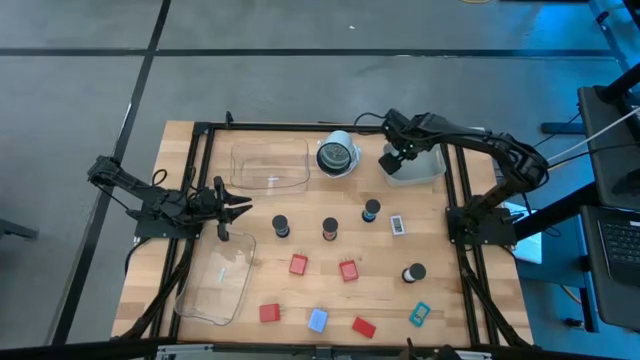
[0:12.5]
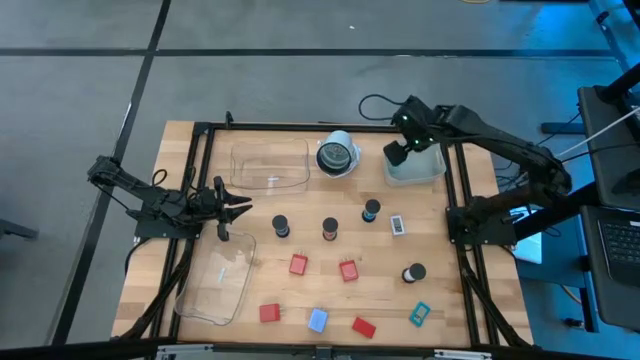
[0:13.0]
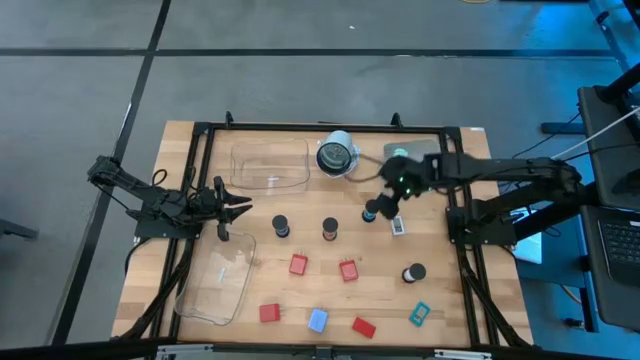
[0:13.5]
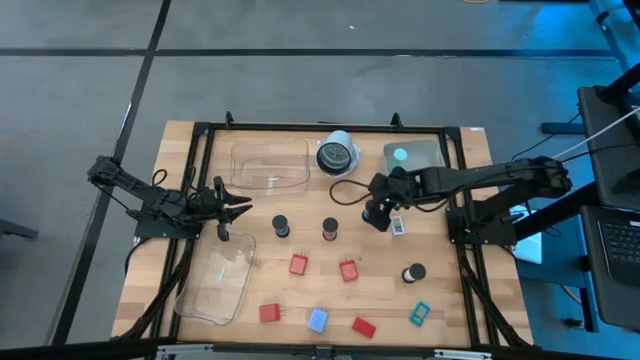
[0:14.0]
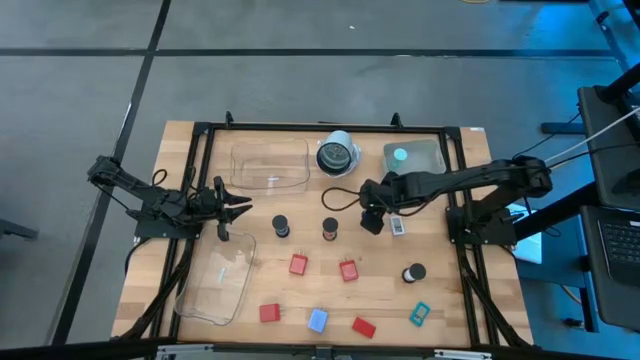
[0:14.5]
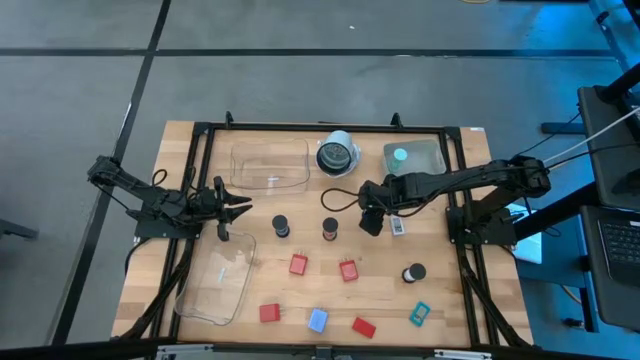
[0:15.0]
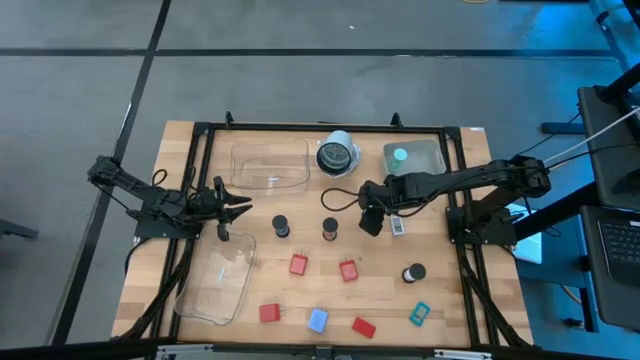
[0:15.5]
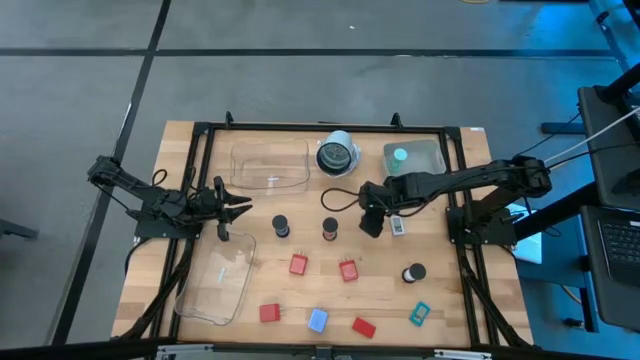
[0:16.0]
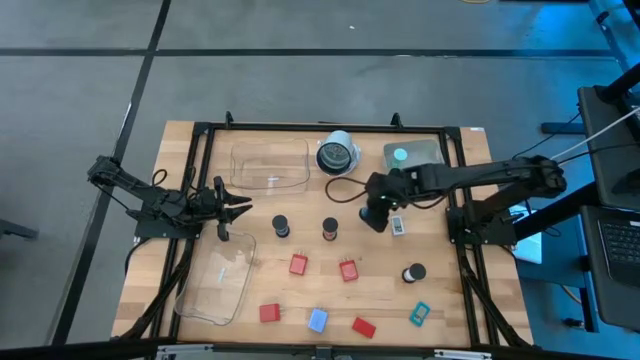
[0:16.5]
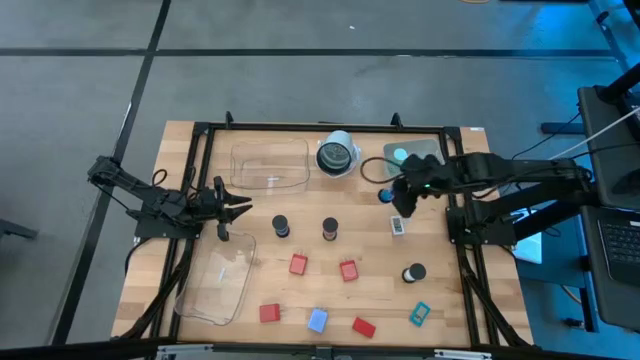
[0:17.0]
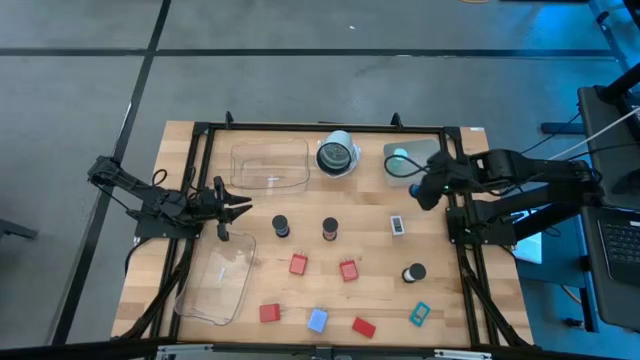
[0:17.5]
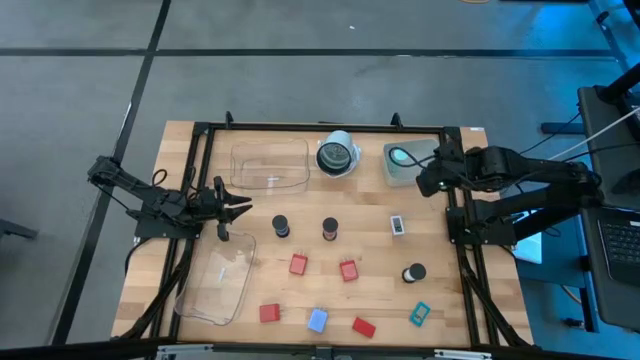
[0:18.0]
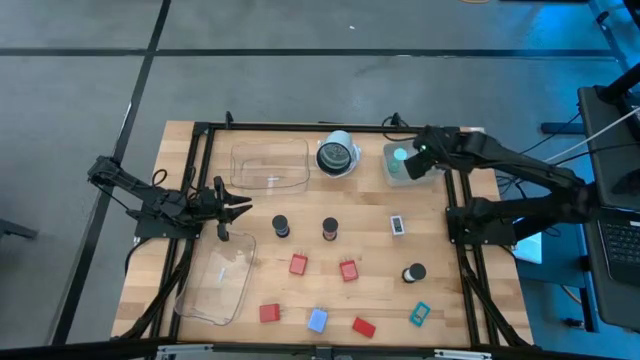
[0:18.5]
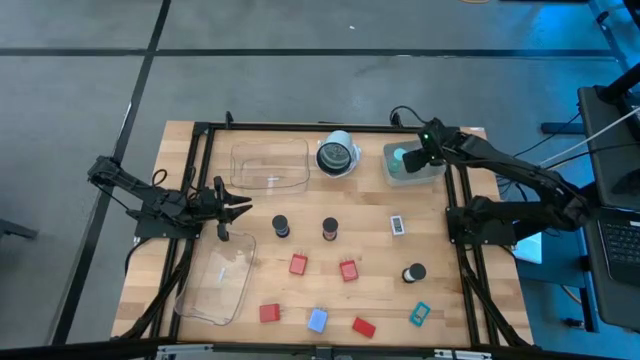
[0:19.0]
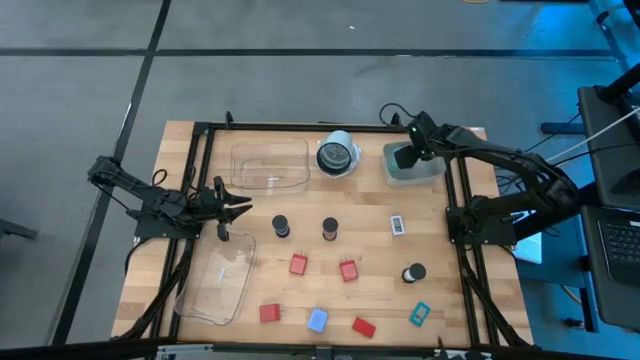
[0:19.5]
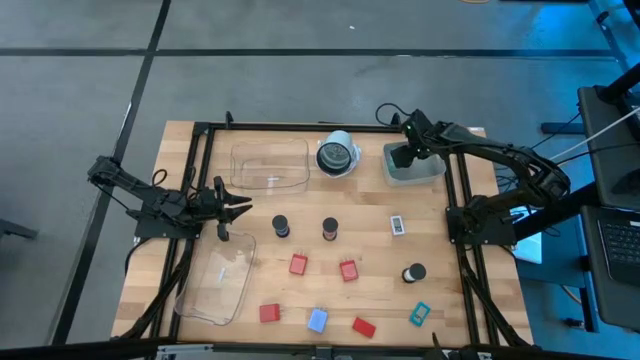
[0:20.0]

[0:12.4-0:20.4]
Task: Pick & Place Office items
Put the blue hourglass into the gray bin

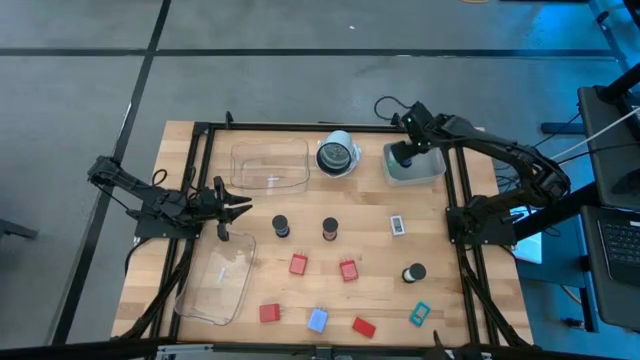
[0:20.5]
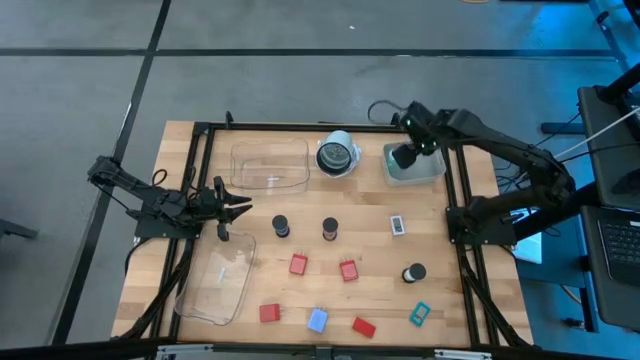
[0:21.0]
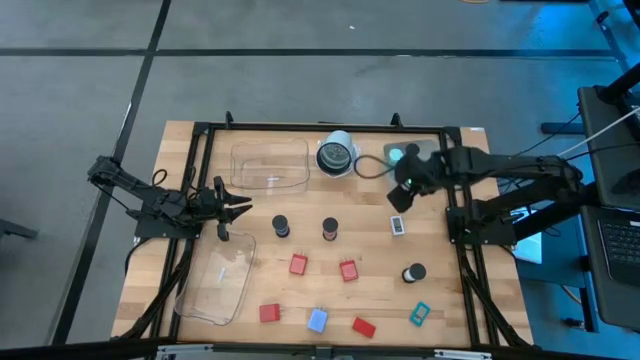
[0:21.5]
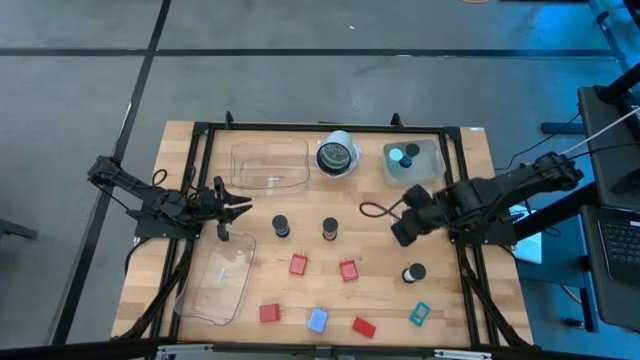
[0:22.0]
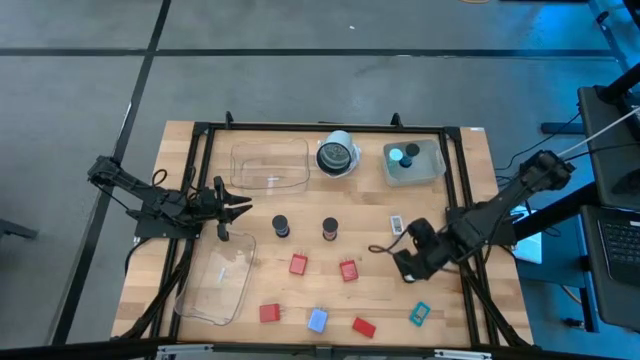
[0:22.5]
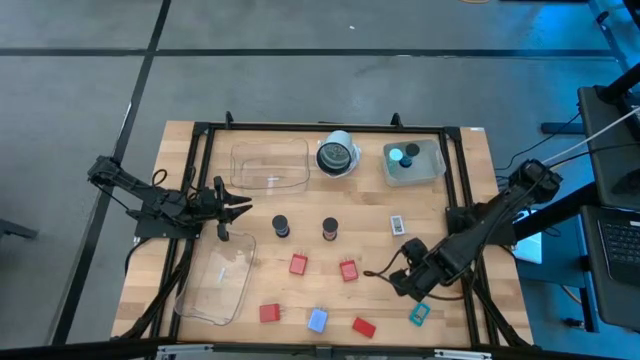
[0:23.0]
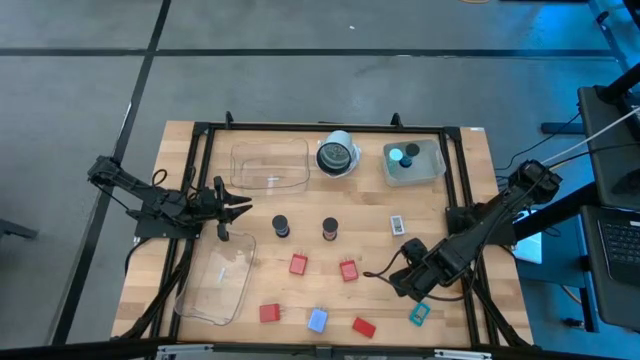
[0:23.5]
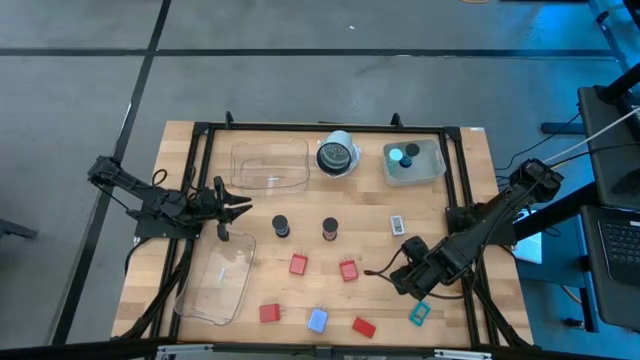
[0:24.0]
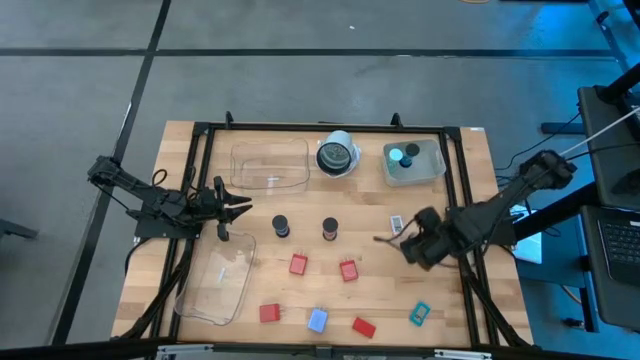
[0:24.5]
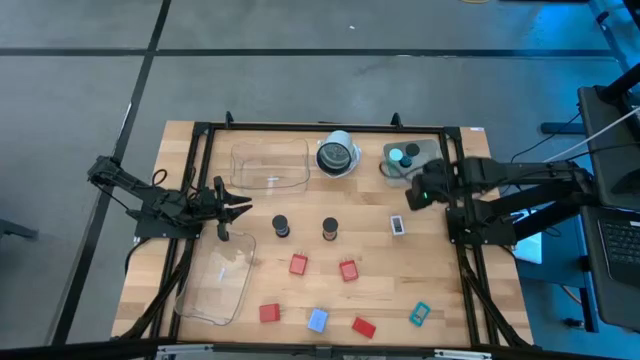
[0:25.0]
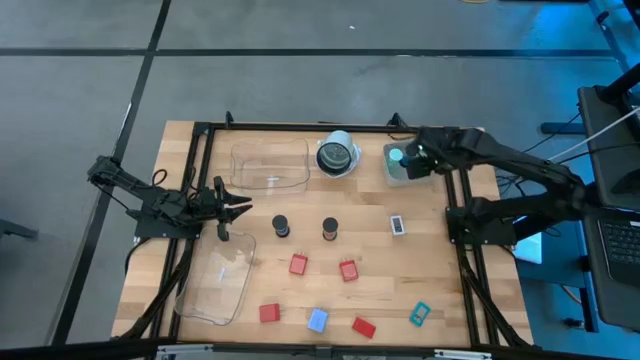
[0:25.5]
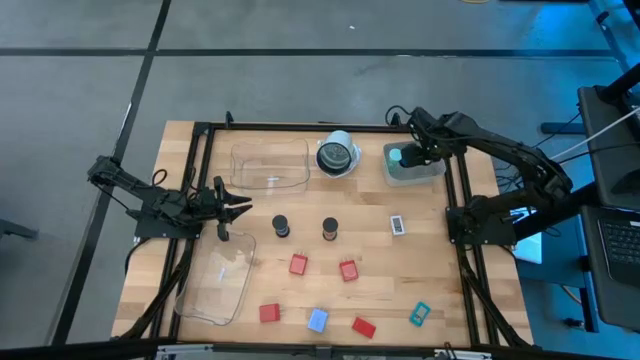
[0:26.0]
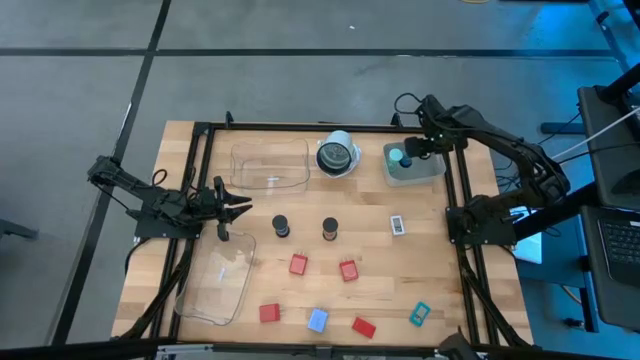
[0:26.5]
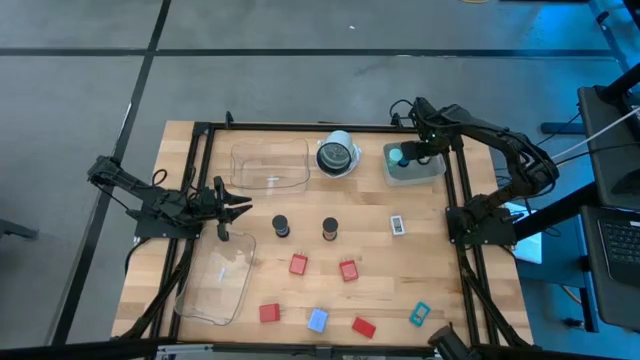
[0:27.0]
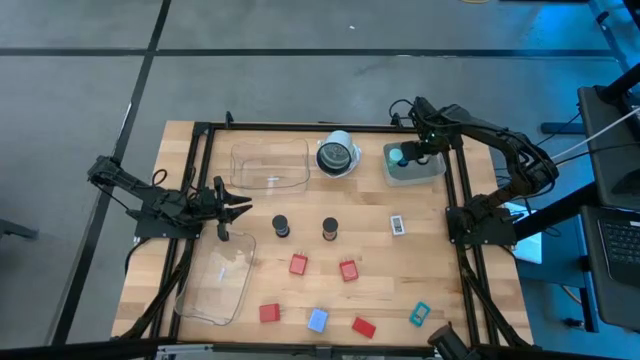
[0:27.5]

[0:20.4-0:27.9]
Put the white hourglass into the gray bin

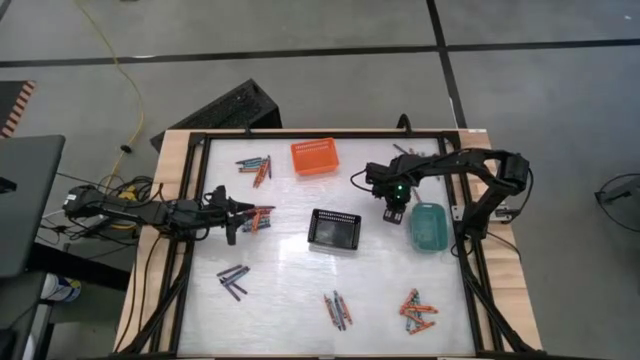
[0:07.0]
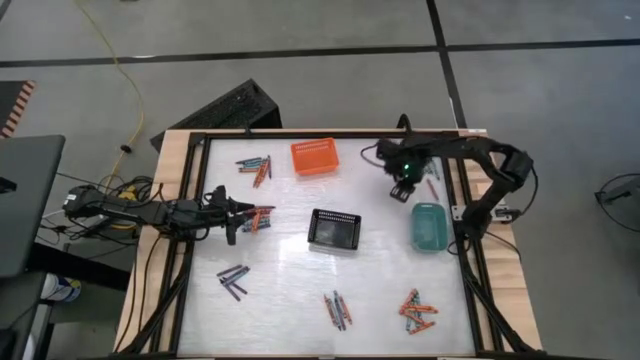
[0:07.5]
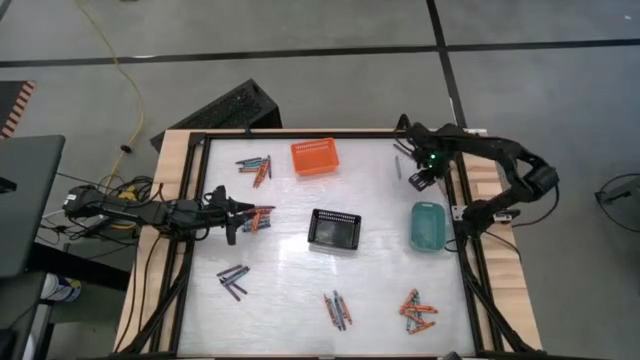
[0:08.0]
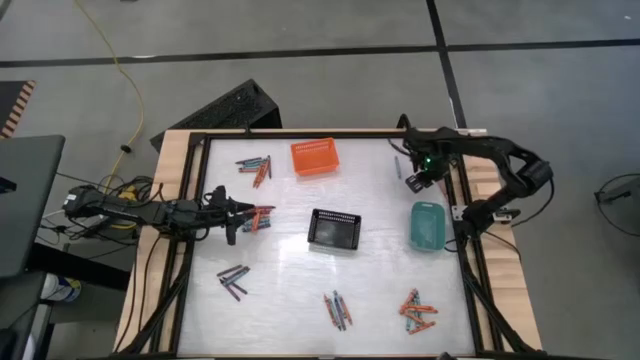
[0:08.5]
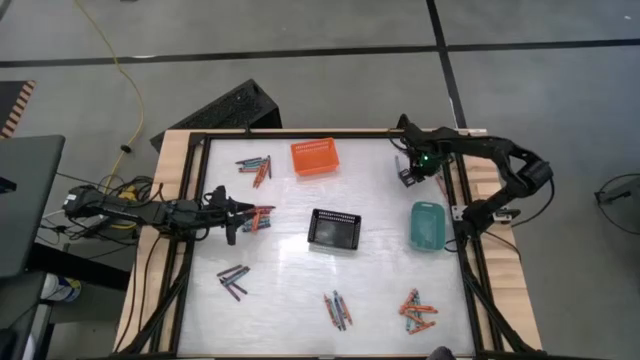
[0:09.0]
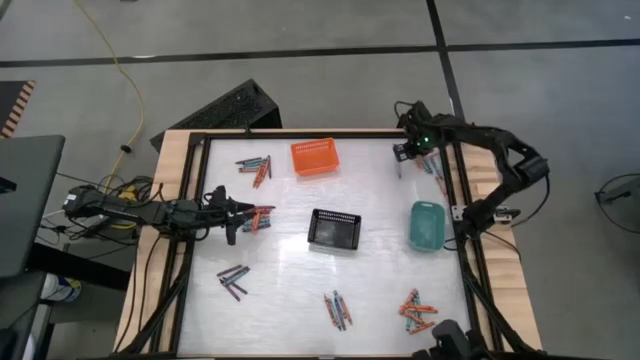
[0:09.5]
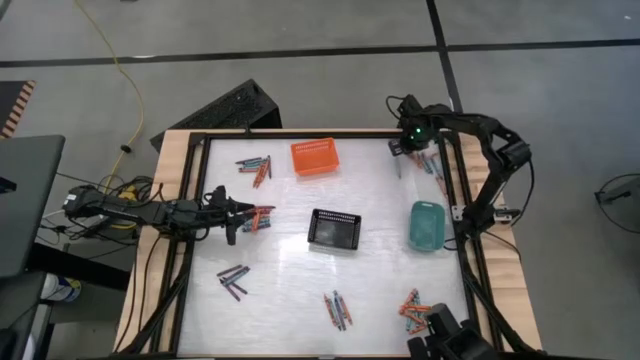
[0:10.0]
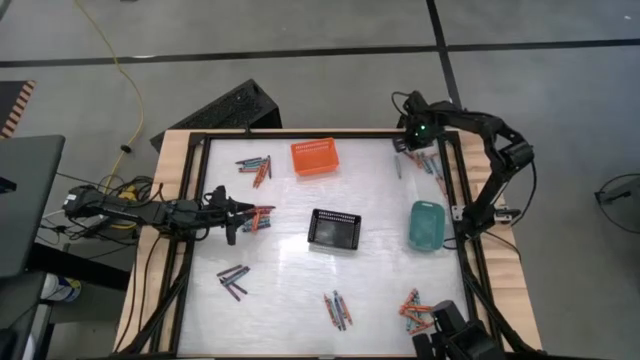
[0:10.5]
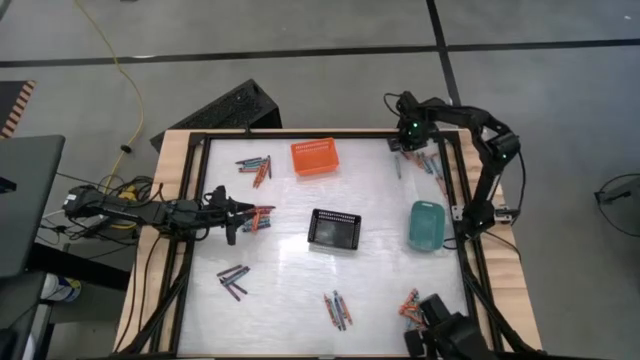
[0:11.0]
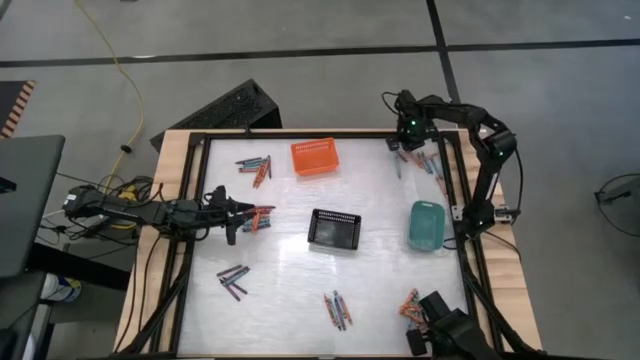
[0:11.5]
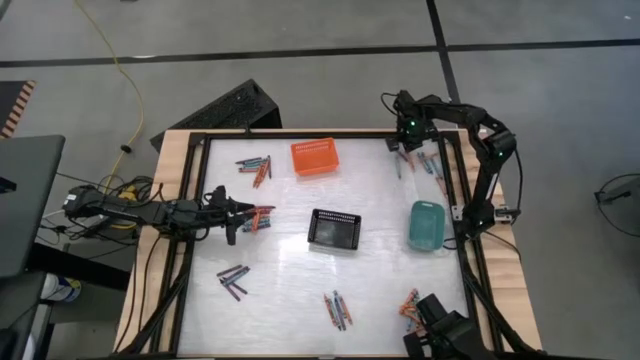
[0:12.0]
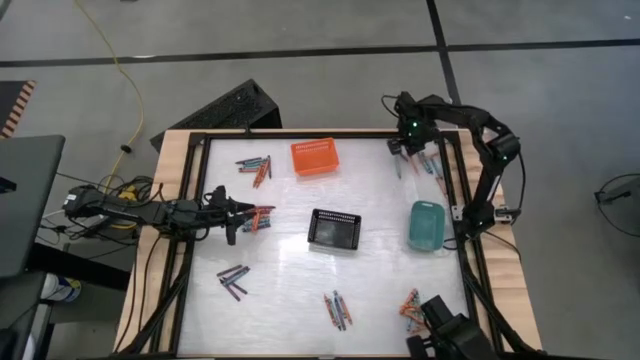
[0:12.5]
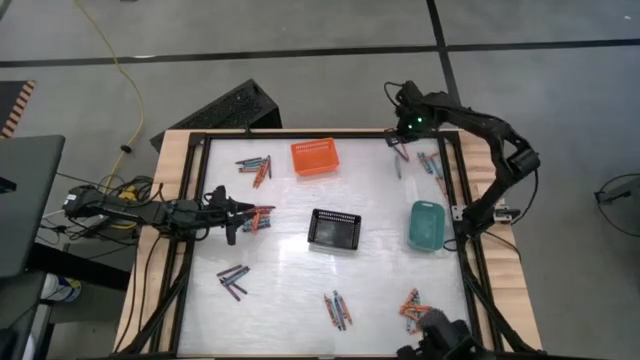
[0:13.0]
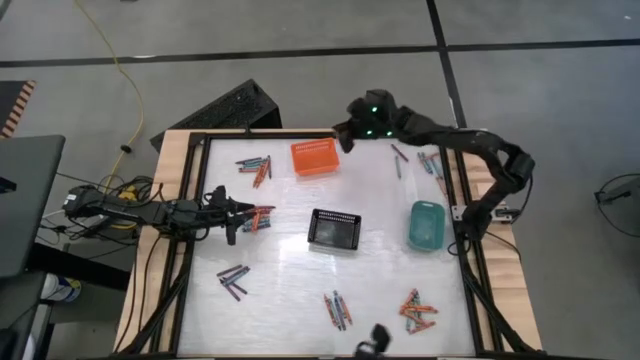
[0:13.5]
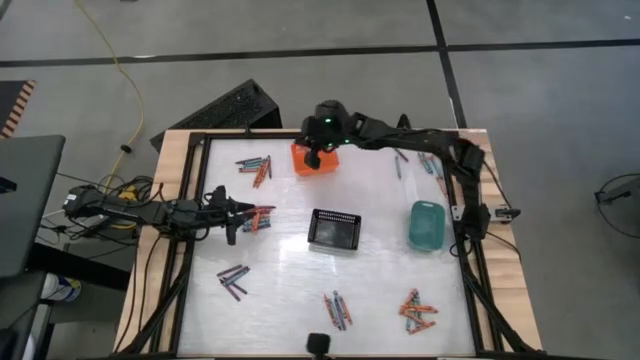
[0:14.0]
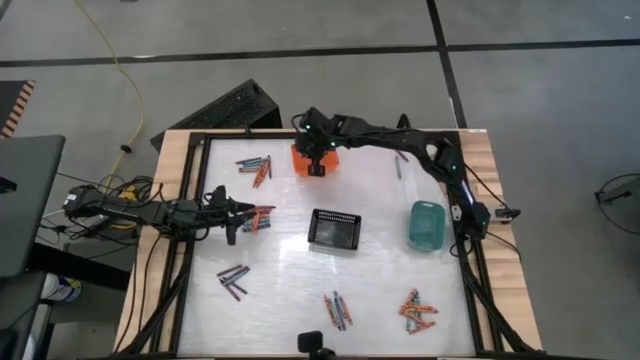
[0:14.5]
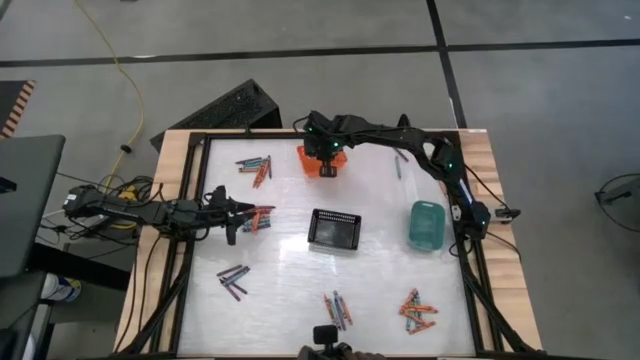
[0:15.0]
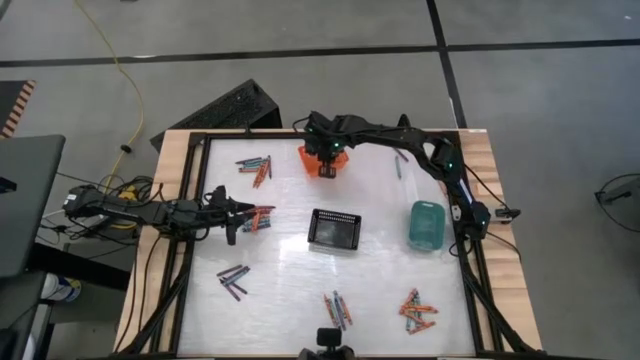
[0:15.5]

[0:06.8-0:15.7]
Task: Sort crayons
Put the orange crayon into the orange bin
